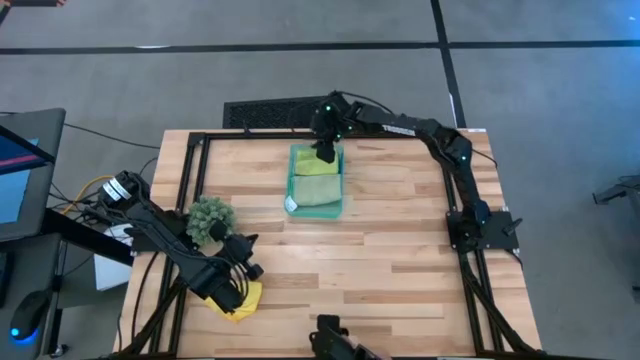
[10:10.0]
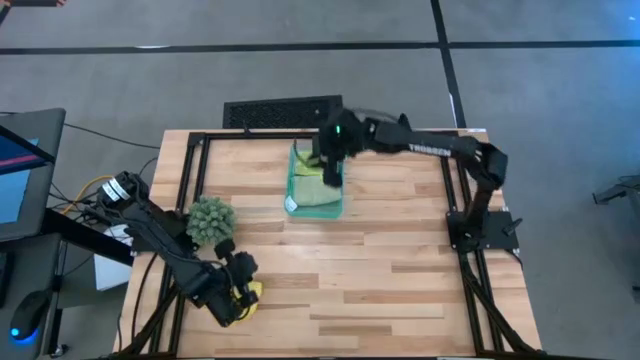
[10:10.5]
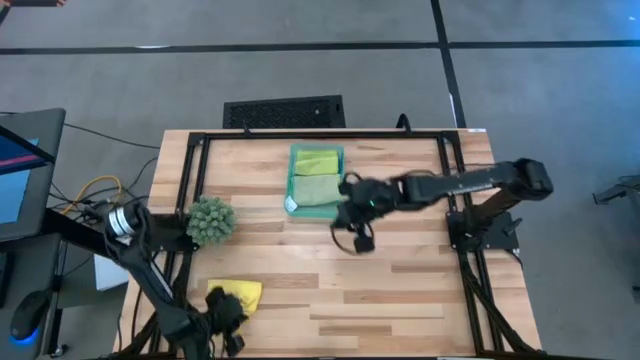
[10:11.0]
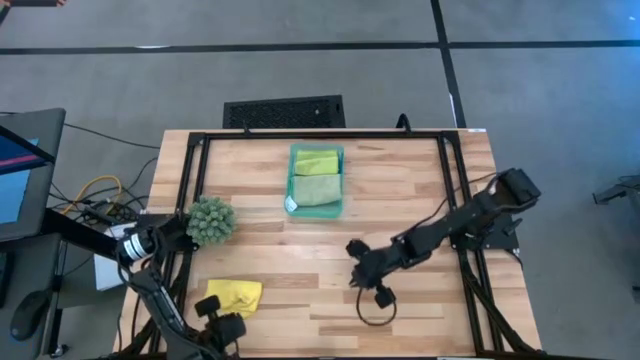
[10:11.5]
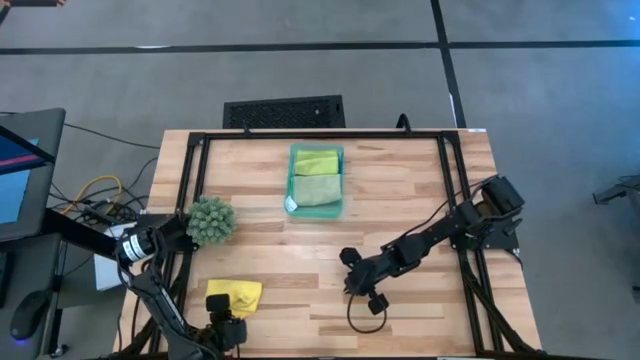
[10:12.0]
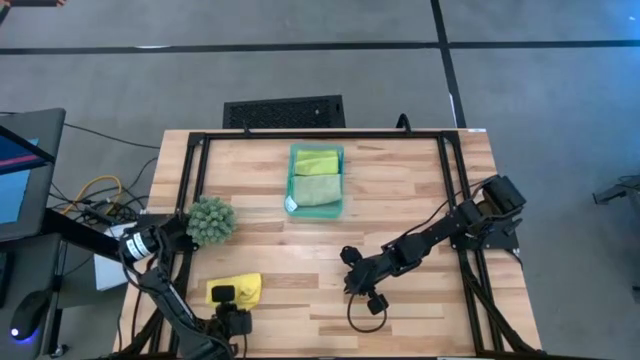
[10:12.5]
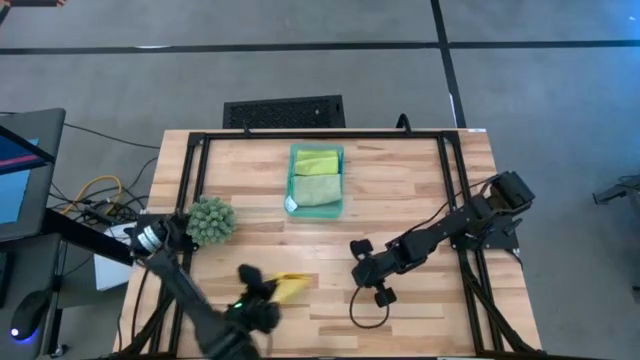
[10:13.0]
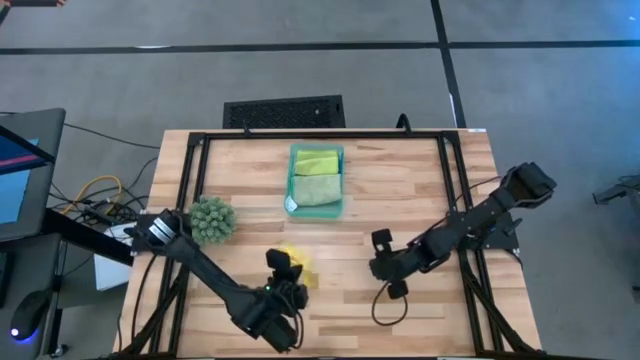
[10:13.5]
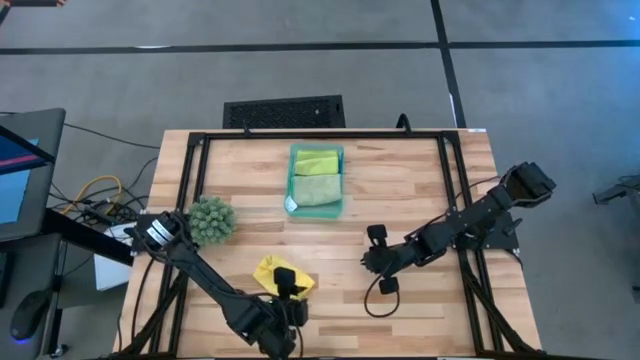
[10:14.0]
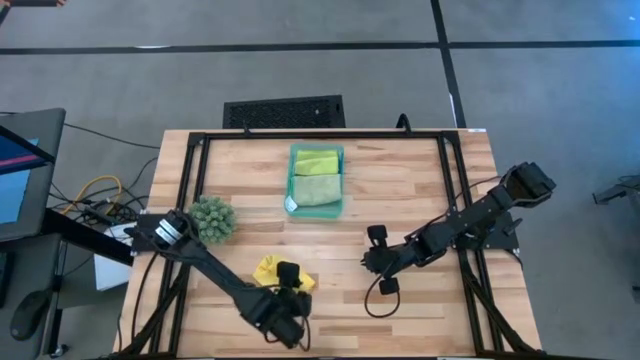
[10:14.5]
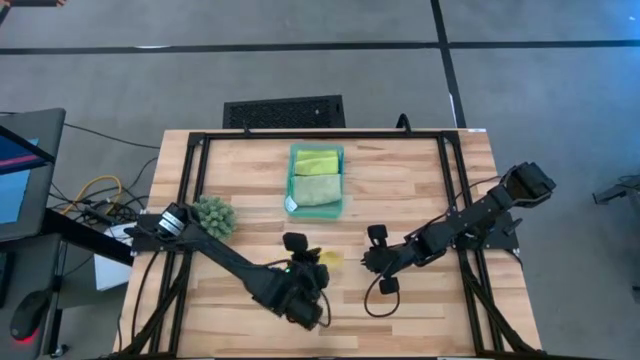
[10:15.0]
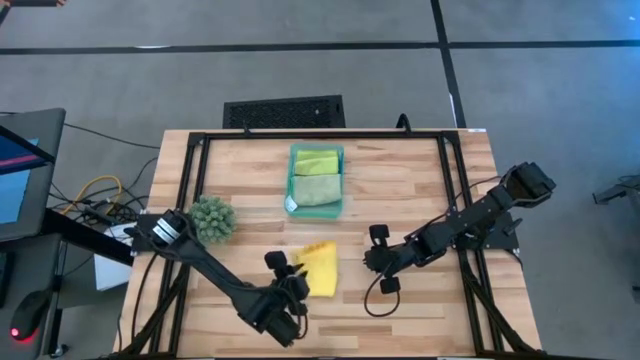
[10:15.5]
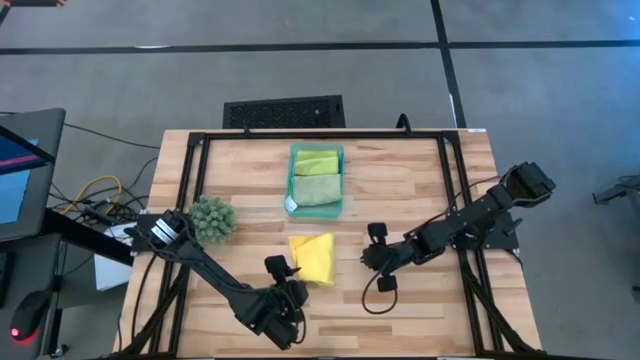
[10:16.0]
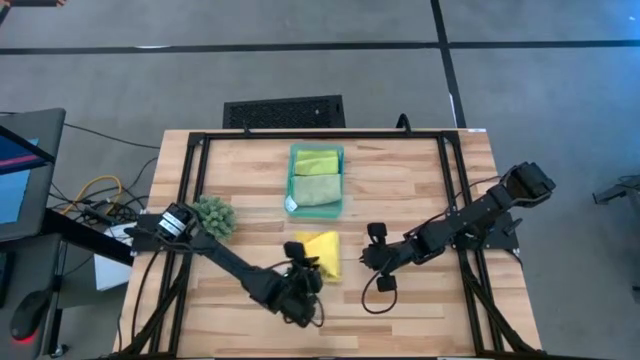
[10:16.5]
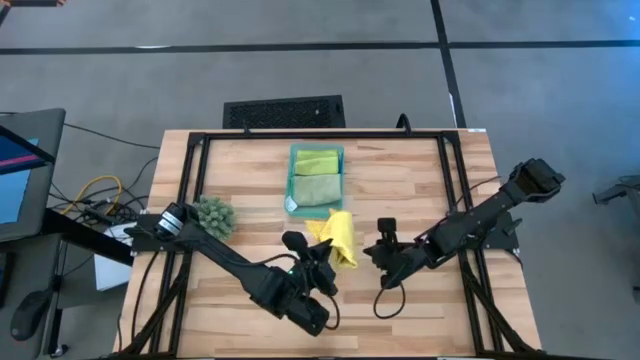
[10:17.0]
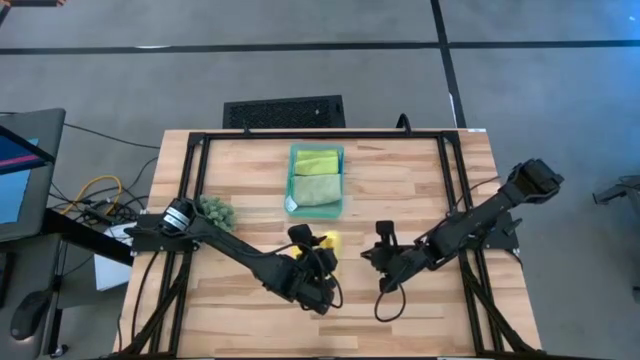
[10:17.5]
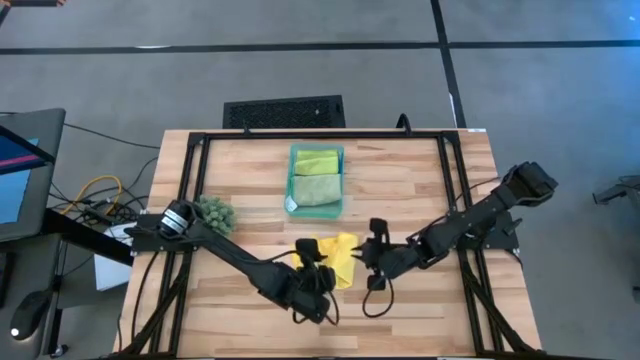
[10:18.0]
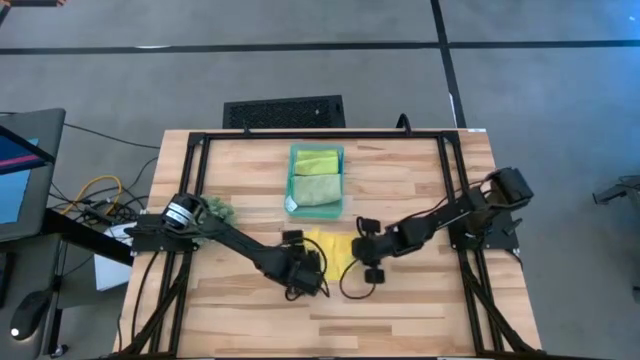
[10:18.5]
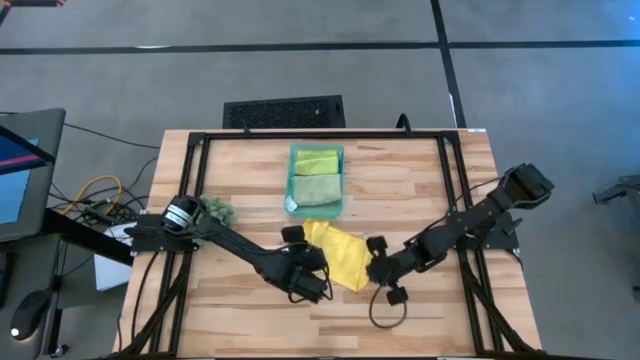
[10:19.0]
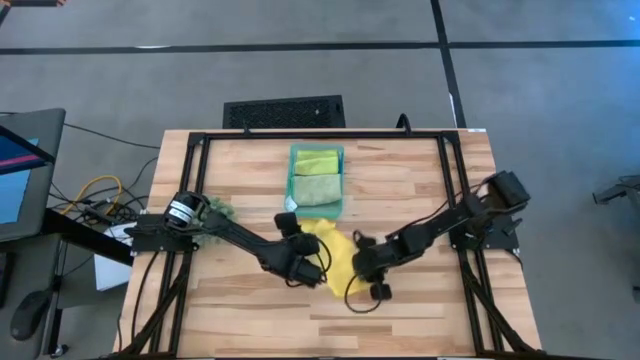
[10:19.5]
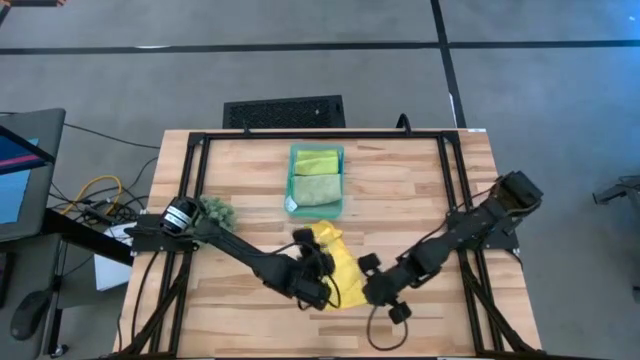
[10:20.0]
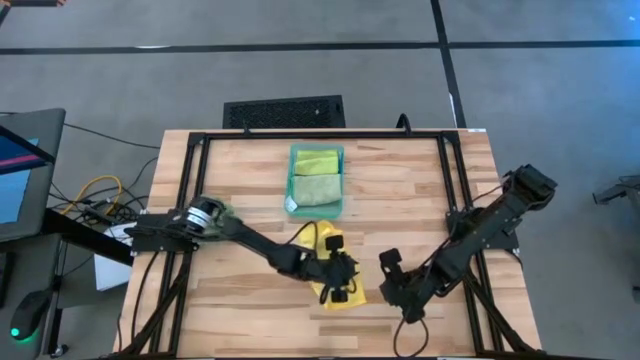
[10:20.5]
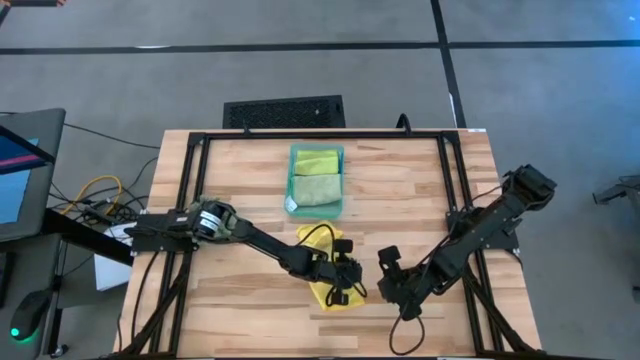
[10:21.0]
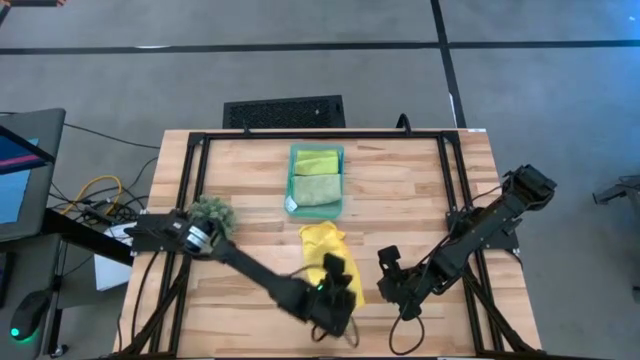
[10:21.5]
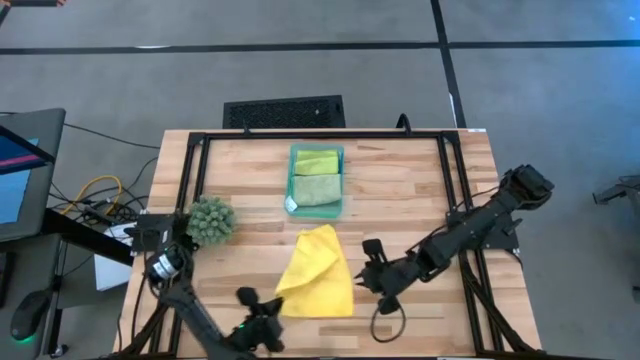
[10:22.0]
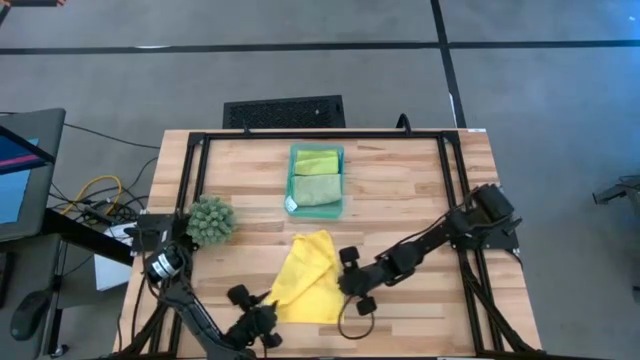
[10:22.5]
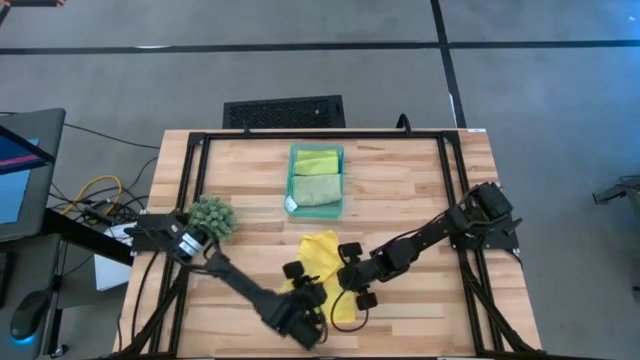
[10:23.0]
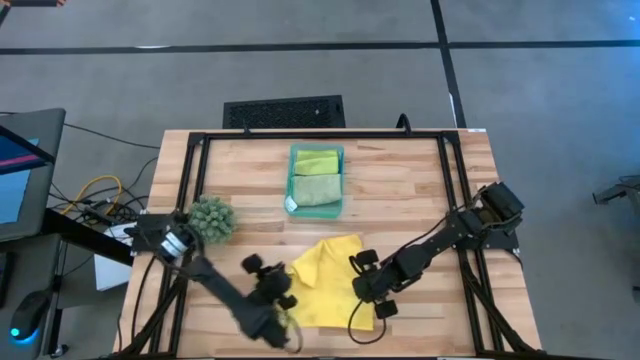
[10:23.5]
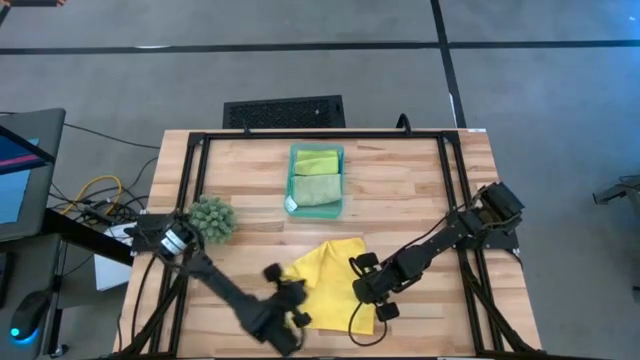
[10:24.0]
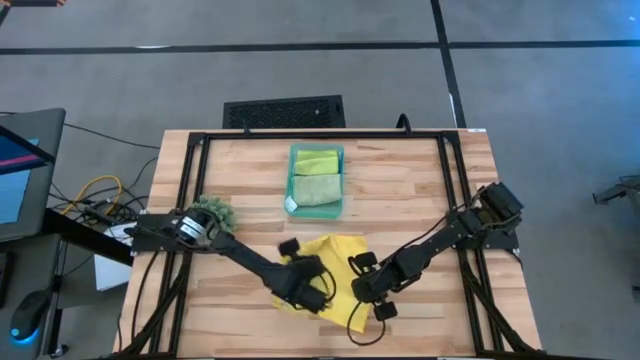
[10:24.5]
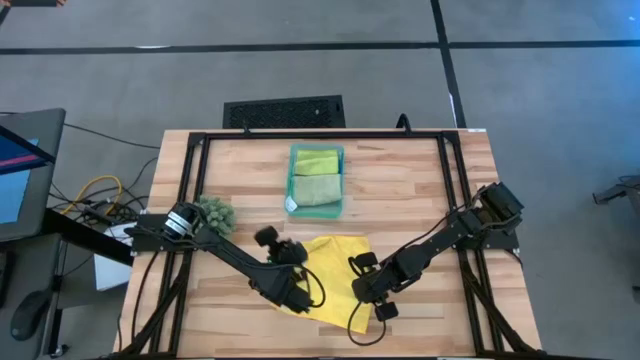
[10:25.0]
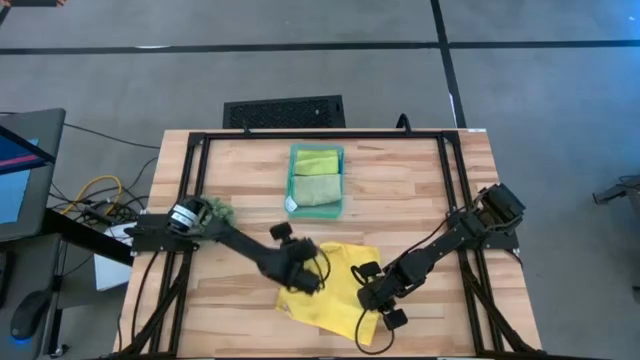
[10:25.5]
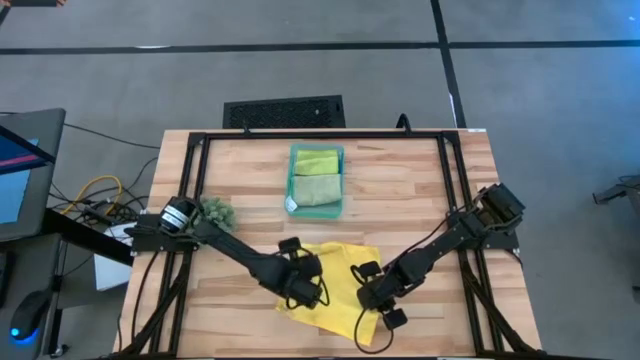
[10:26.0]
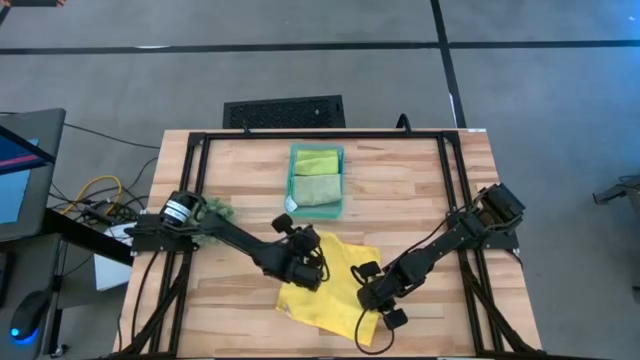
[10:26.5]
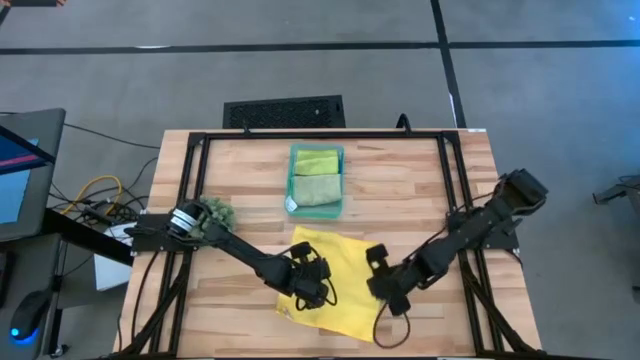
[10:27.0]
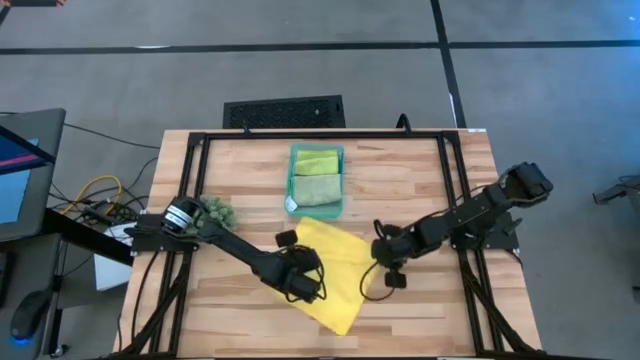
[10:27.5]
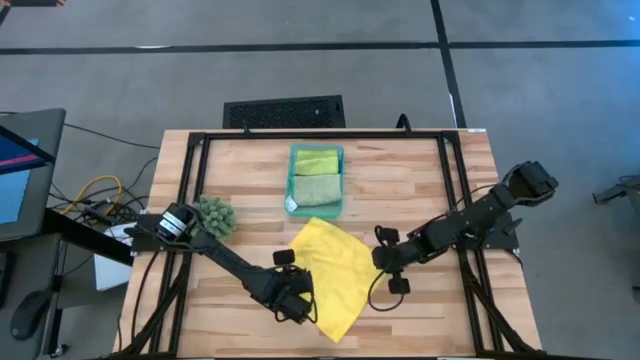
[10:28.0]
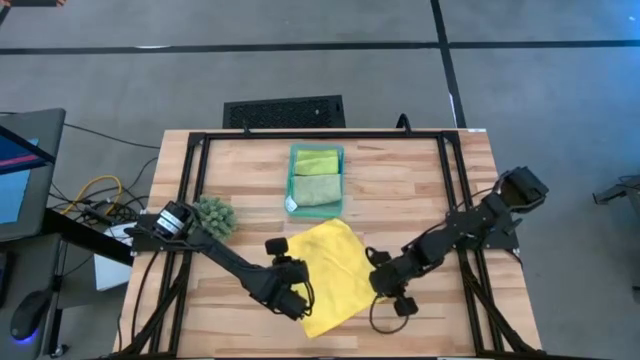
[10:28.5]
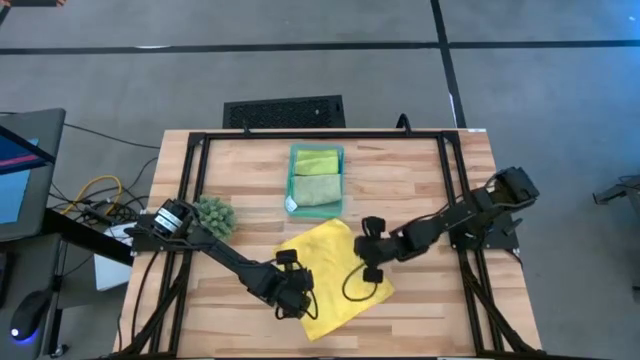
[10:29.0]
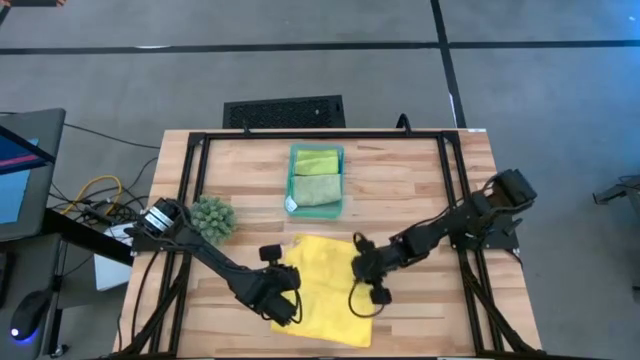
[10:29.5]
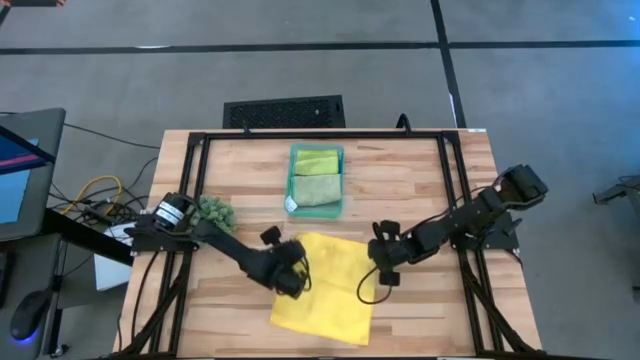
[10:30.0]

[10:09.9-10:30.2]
Task: Fold microfiber towels
Fold the yellow microfiber cloth
